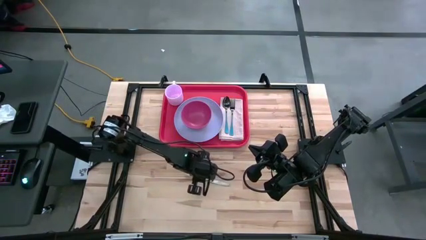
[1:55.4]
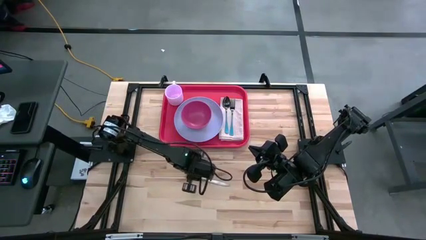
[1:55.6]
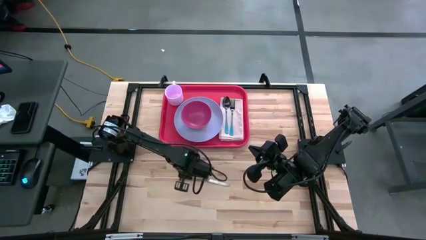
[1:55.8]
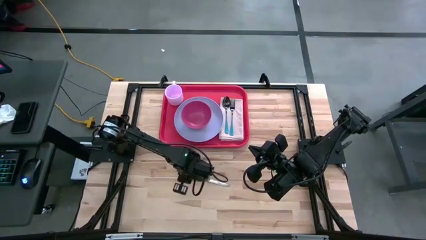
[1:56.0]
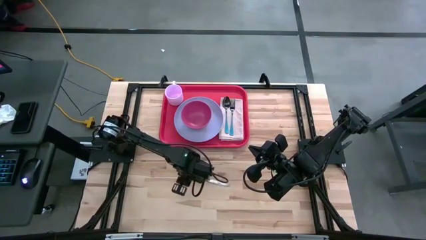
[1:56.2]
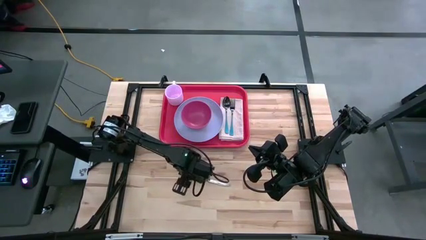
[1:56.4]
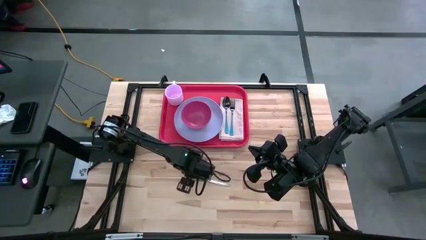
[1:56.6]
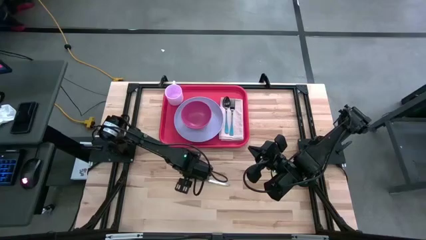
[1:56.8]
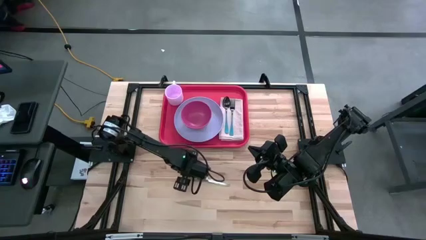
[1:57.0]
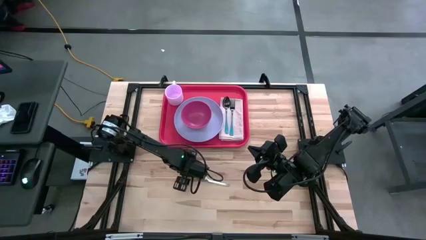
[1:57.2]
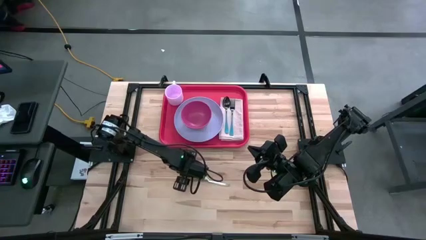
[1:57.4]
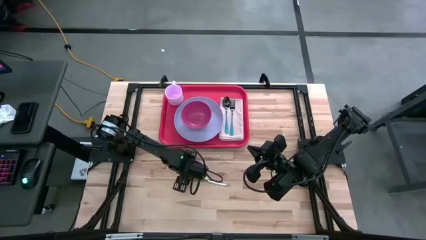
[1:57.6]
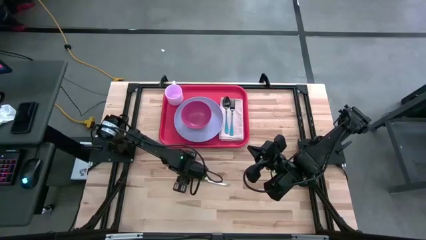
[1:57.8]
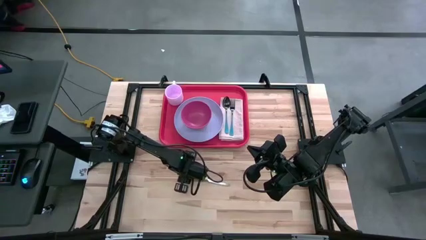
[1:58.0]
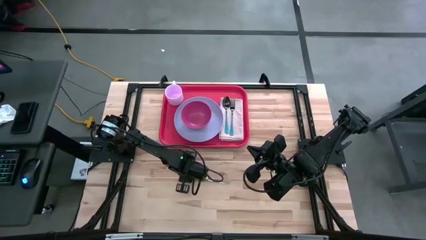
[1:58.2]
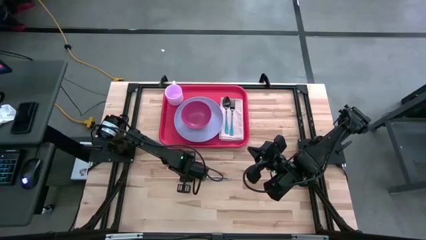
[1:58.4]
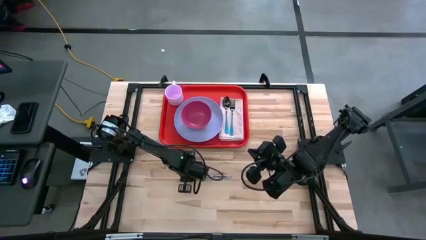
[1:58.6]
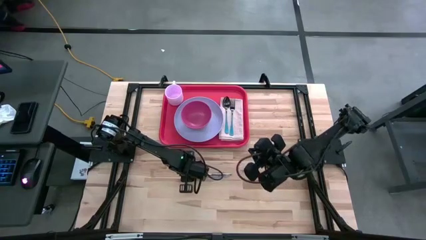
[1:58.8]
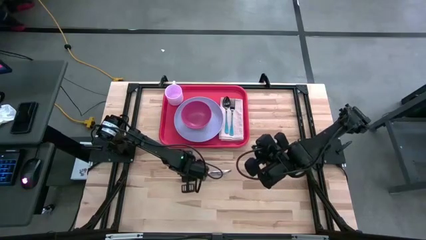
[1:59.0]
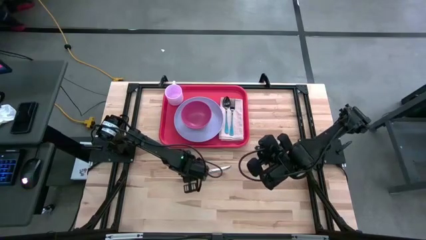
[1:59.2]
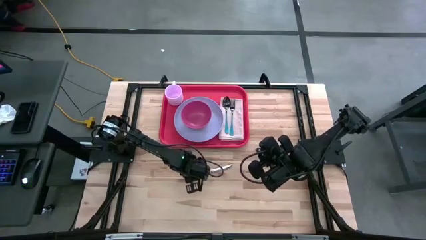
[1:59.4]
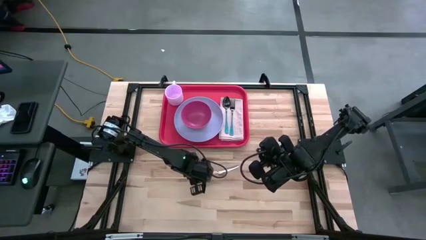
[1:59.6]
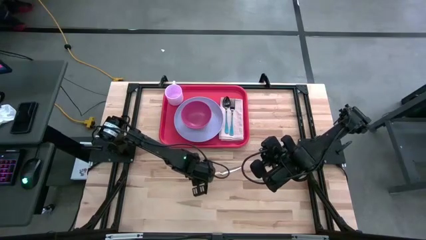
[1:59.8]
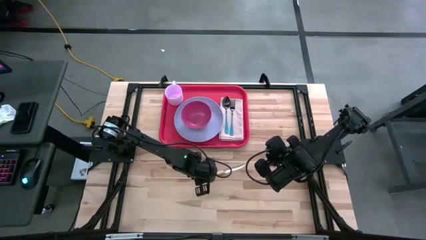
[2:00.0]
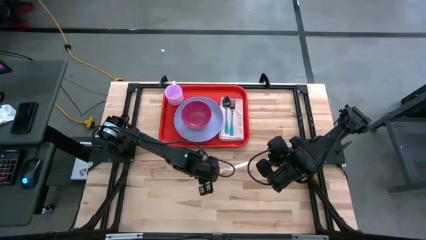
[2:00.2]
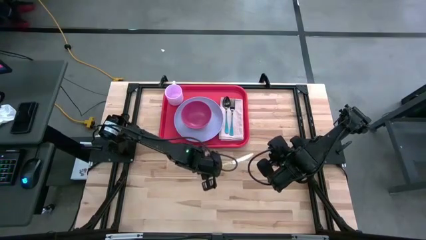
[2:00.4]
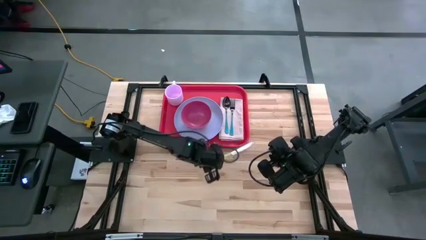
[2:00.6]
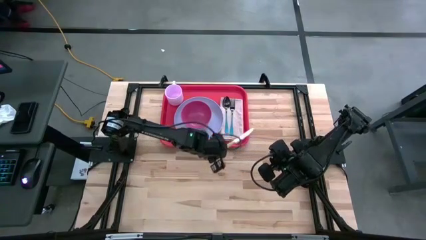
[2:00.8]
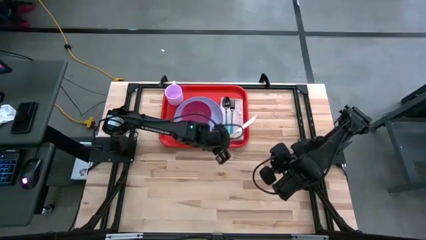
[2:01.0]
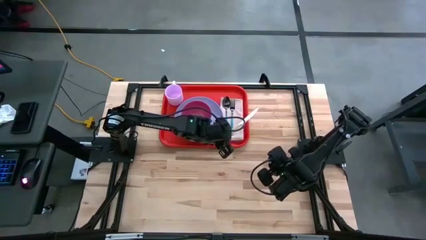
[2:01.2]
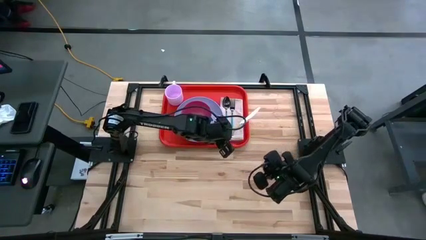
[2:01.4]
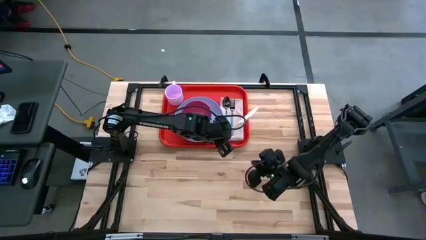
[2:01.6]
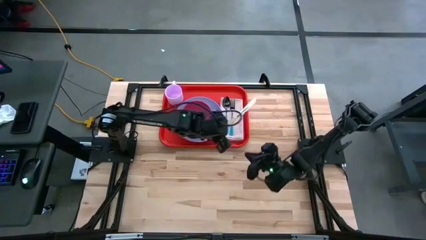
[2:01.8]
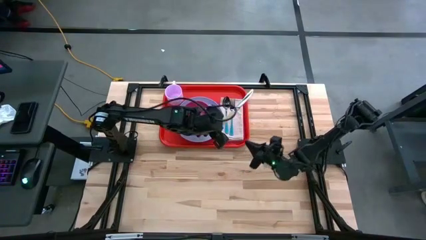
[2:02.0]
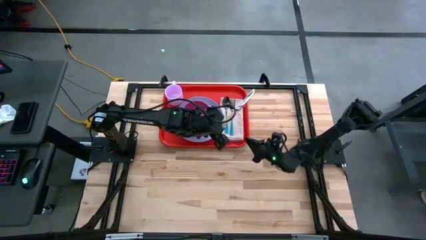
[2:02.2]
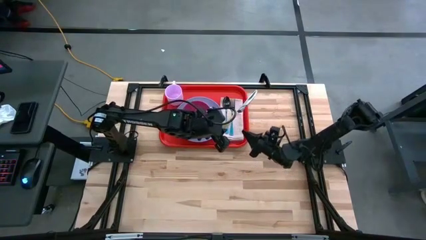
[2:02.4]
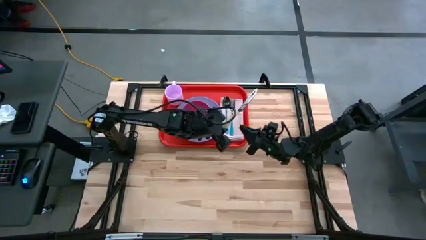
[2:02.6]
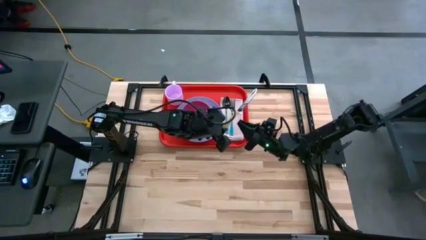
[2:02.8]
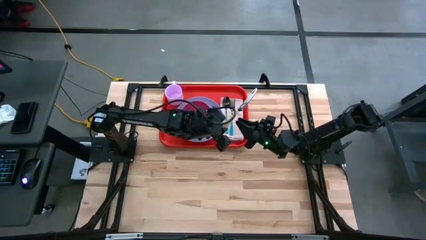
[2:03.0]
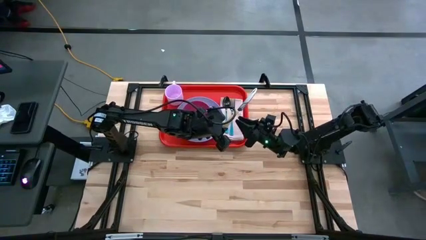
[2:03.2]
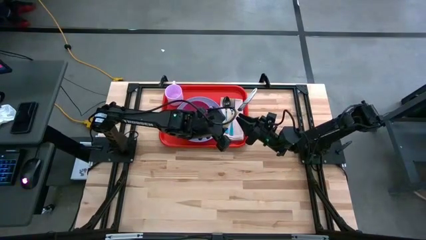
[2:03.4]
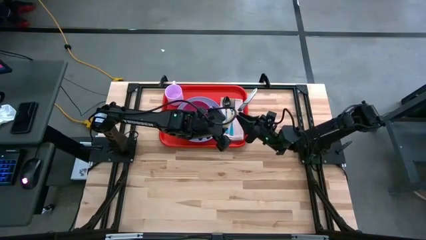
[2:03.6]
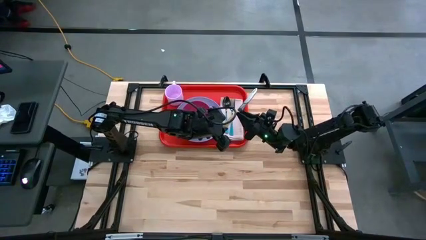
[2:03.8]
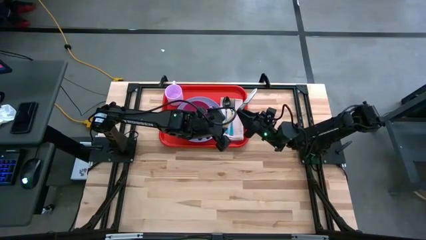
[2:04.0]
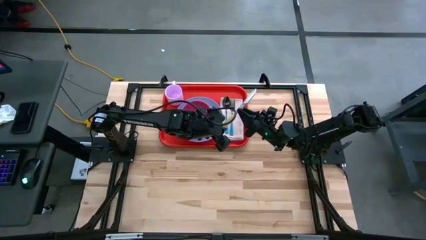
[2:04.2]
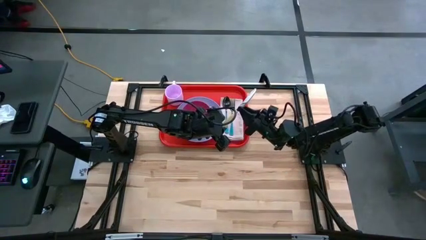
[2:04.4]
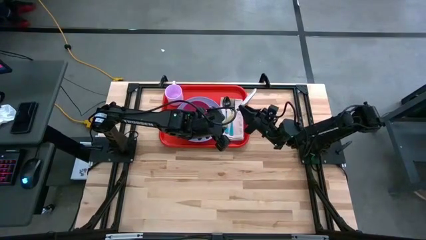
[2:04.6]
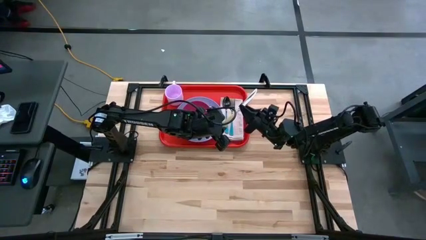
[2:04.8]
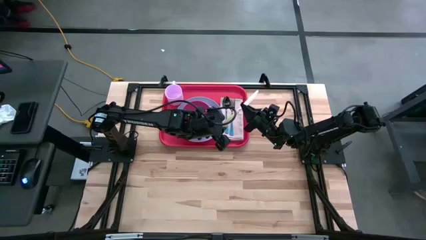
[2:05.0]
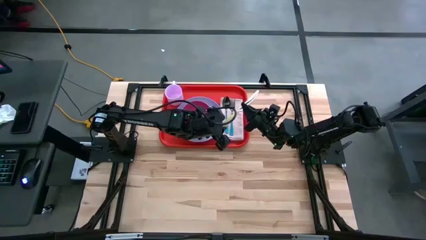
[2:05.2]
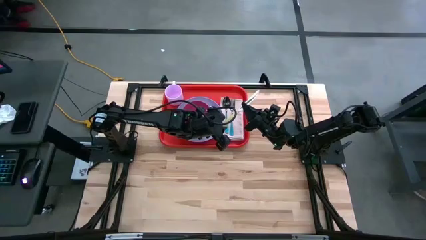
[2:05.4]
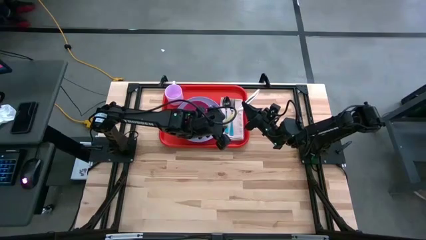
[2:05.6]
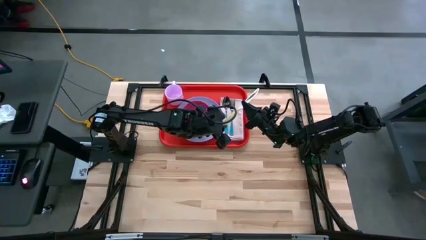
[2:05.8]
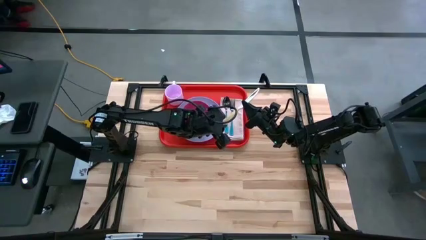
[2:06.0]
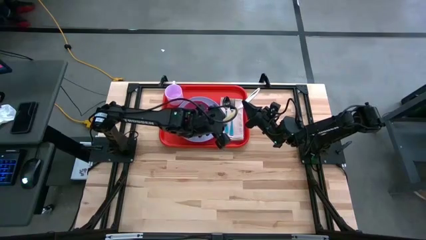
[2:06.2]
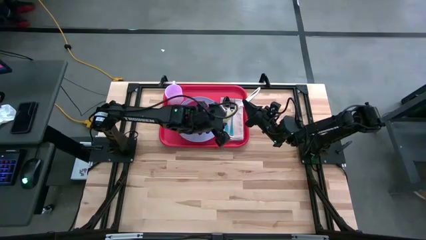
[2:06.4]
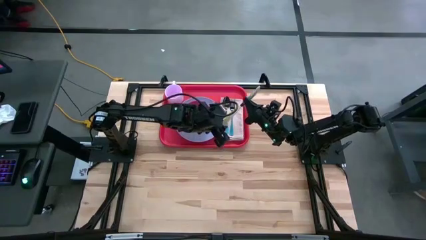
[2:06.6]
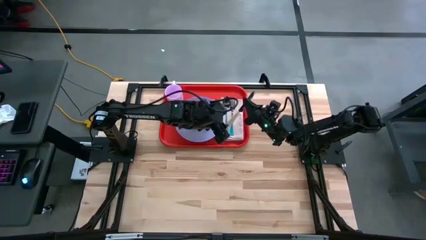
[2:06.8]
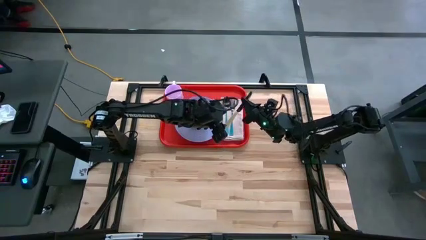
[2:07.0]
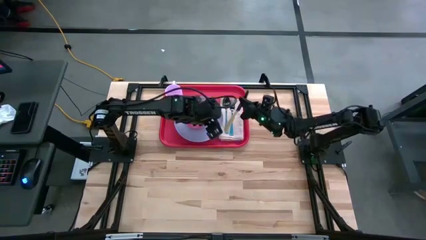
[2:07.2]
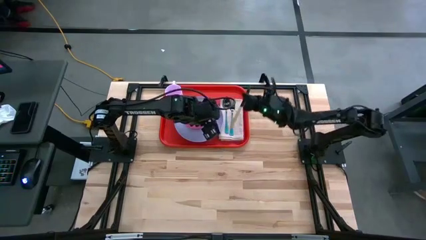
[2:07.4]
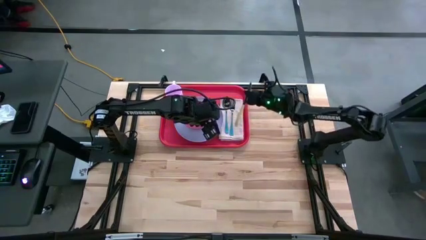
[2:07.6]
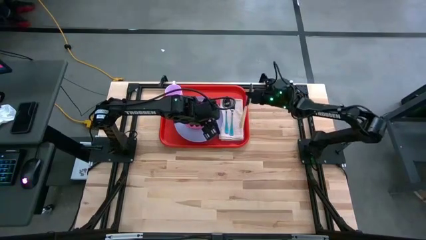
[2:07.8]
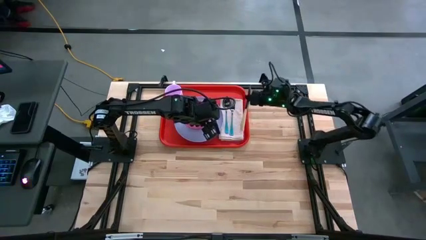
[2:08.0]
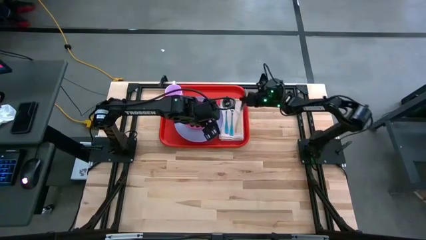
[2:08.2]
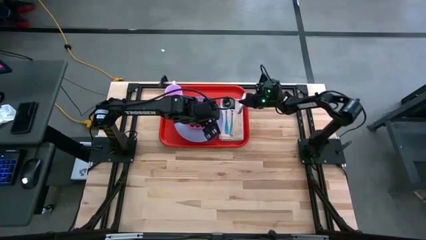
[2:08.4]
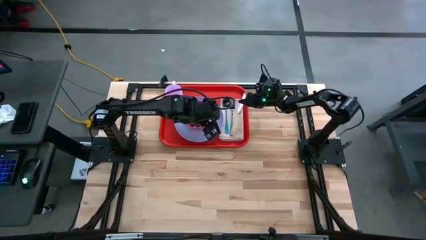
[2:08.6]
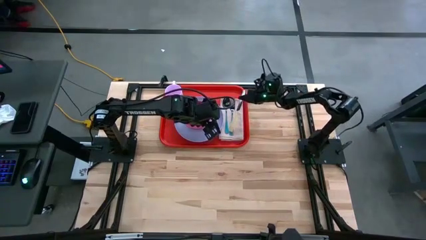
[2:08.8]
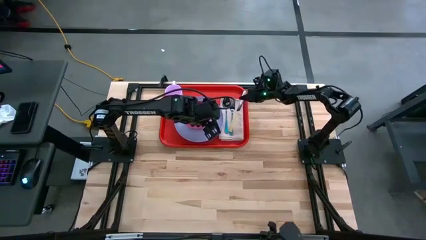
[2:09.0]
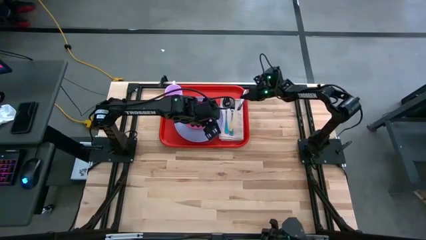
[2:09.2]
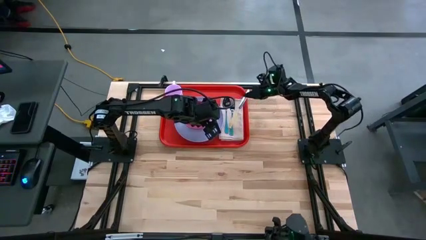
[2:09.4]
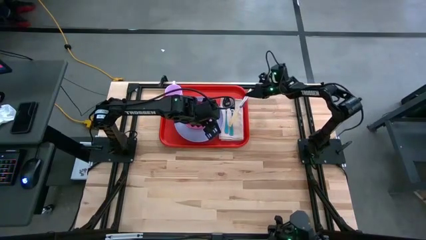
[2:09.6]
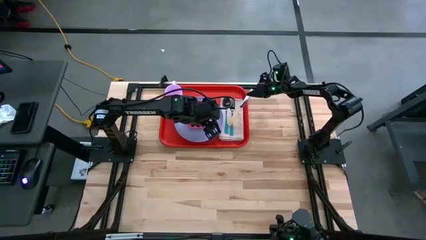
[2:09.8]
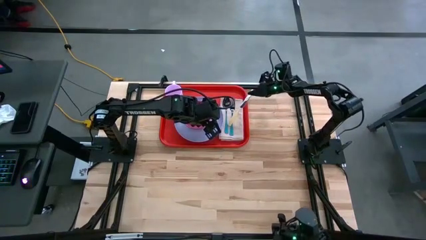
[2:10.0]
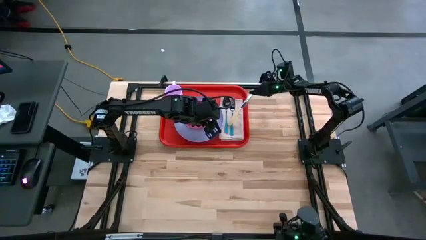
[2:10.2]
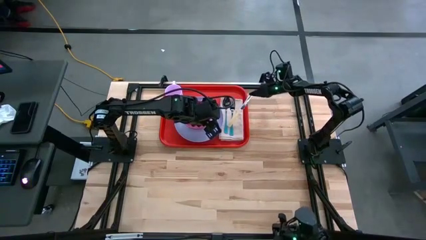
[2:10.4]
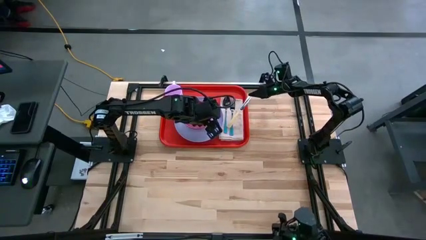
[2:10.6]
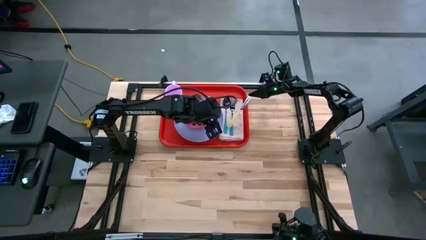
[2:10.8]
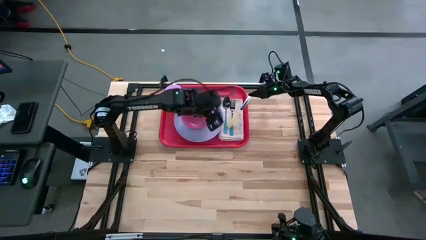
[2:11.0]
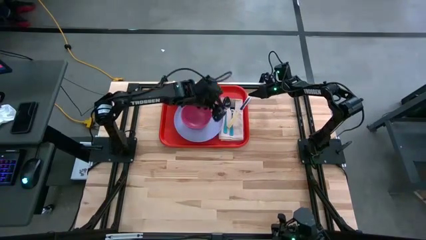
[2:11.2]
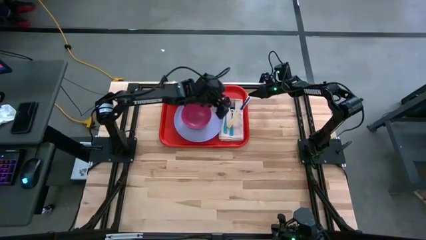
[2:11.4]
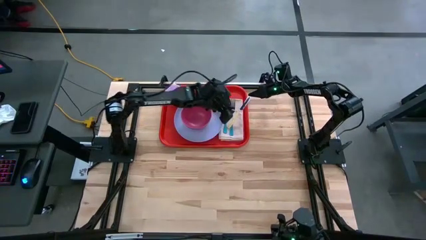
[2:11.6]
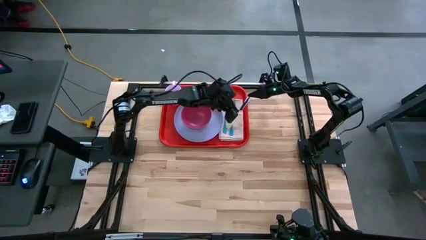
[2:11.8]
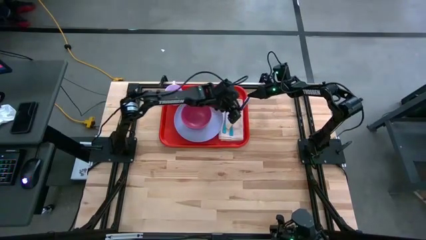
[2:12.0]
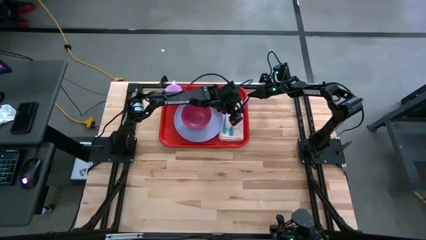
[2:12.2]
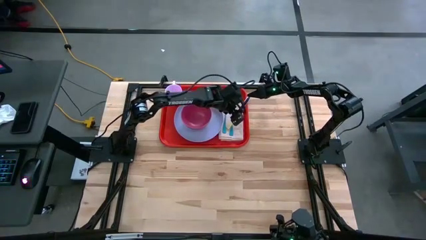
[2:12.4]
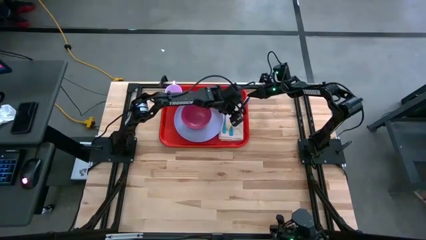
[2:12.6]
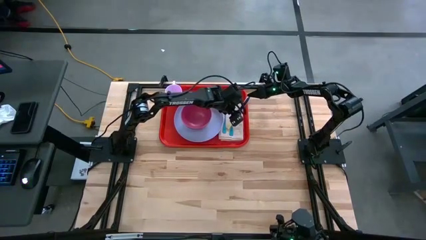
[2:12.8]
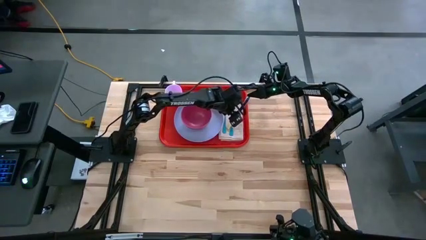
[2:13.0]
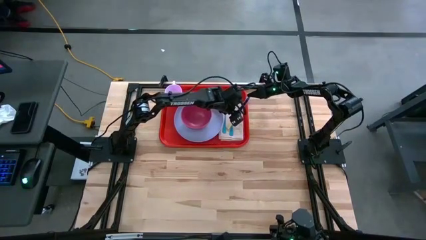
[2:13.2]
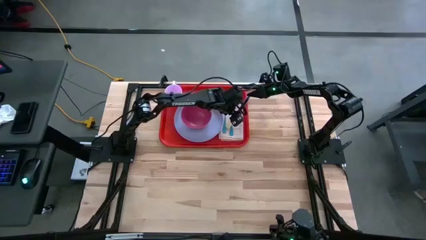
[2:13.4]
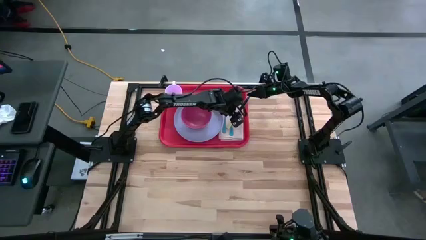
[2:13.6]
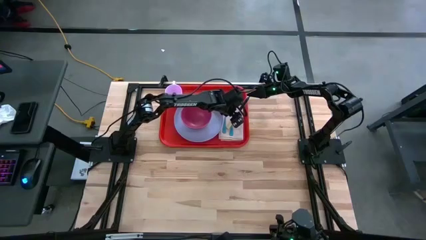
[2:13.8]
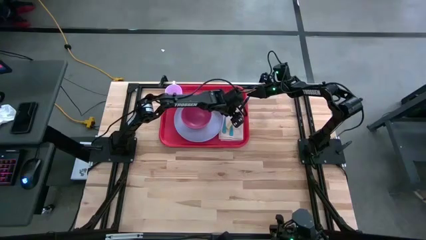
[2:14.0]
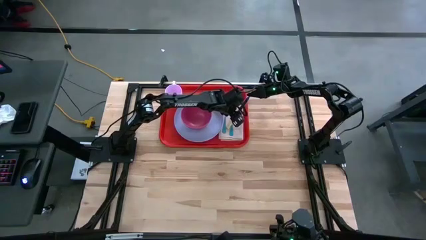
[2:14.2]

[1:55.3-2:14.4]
Task: Set up tray
Put the yellow knife on the brown napkin
